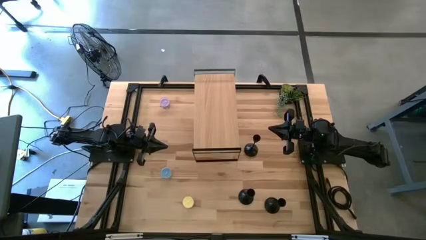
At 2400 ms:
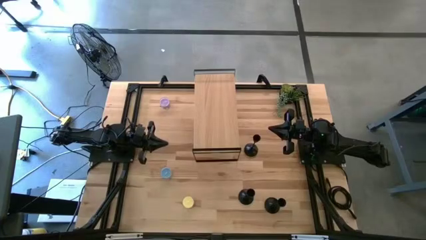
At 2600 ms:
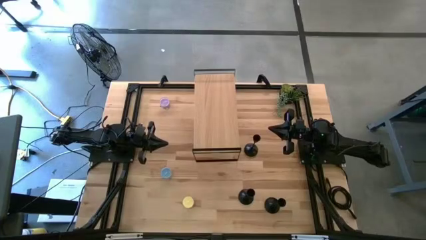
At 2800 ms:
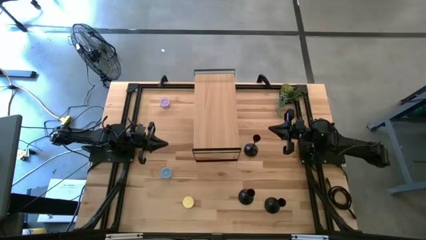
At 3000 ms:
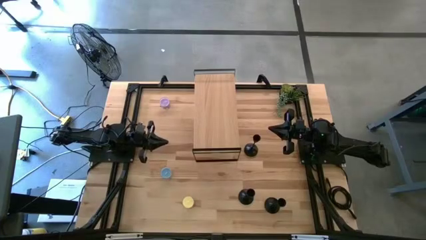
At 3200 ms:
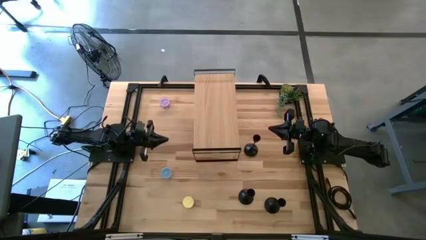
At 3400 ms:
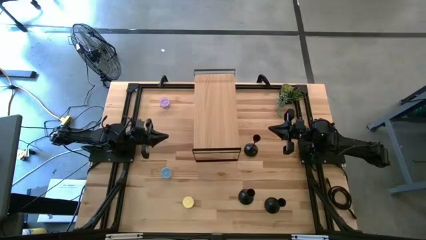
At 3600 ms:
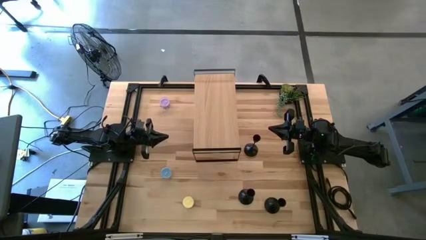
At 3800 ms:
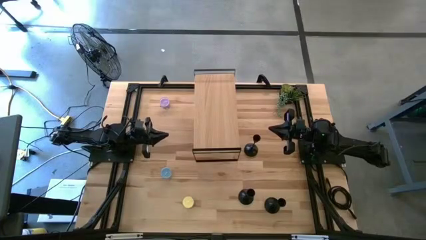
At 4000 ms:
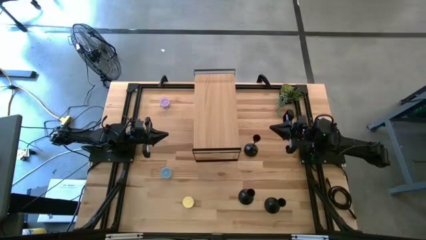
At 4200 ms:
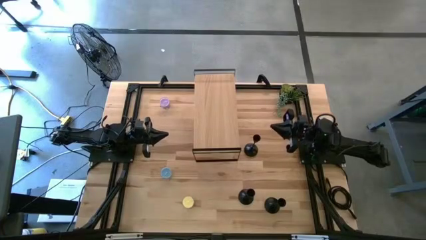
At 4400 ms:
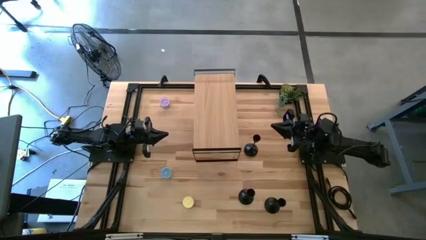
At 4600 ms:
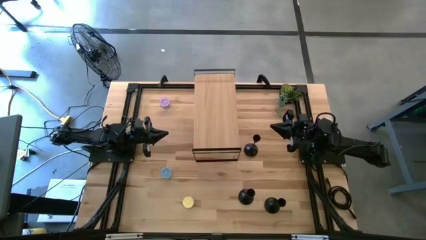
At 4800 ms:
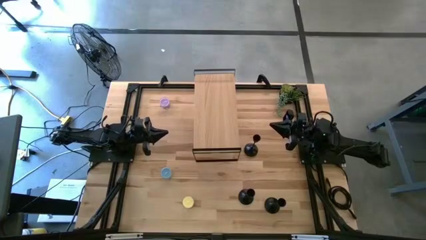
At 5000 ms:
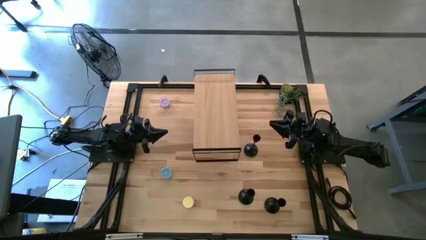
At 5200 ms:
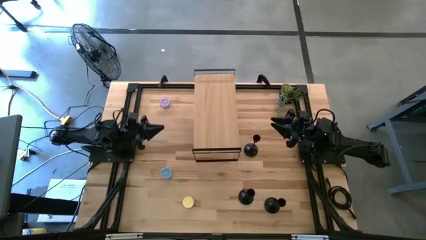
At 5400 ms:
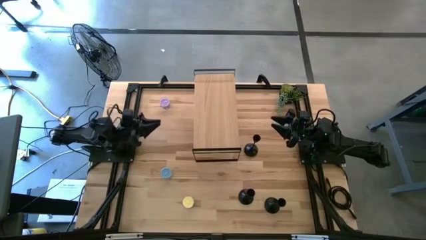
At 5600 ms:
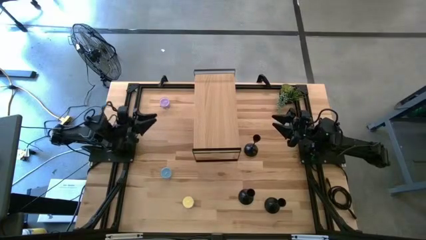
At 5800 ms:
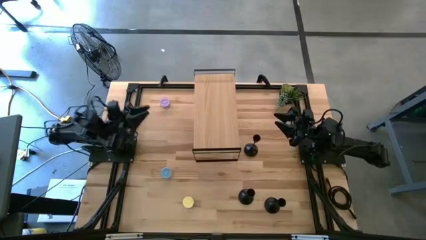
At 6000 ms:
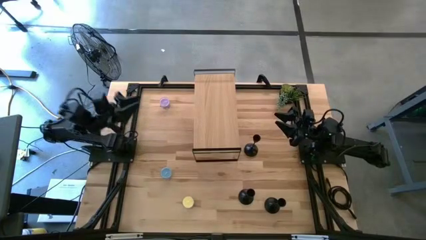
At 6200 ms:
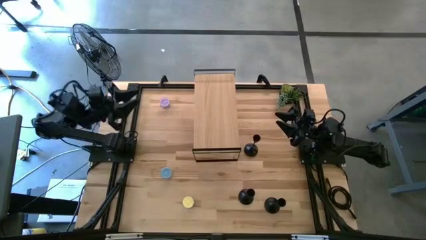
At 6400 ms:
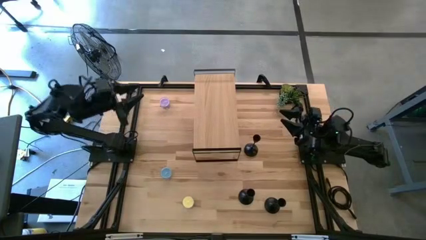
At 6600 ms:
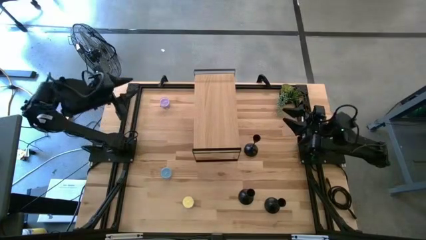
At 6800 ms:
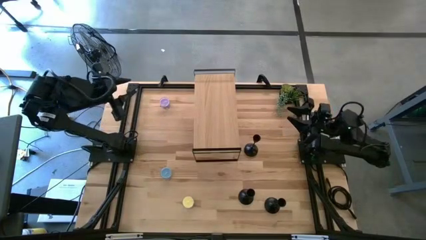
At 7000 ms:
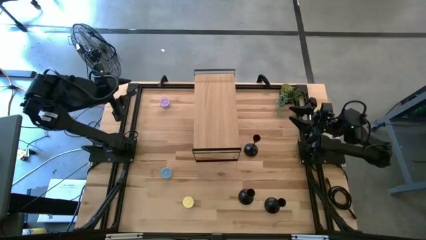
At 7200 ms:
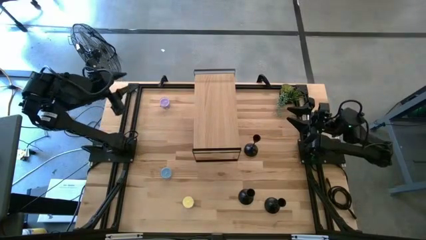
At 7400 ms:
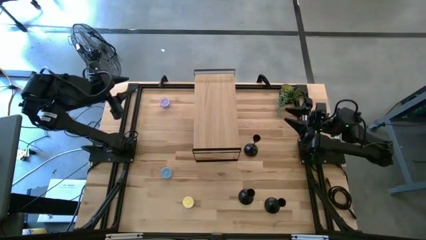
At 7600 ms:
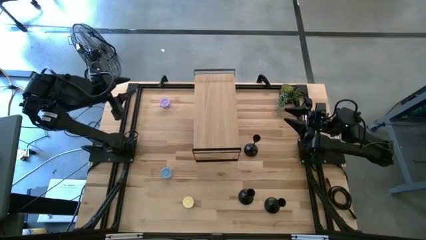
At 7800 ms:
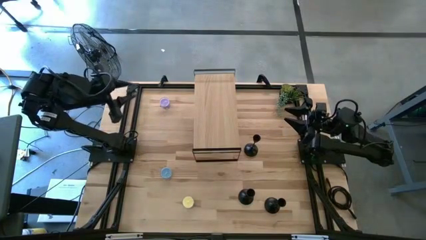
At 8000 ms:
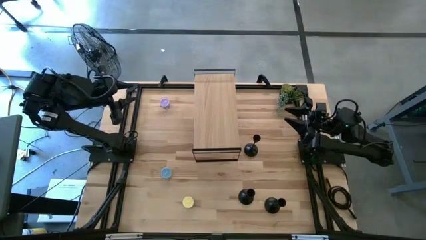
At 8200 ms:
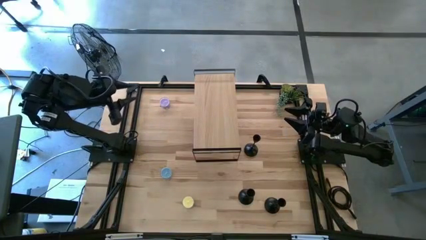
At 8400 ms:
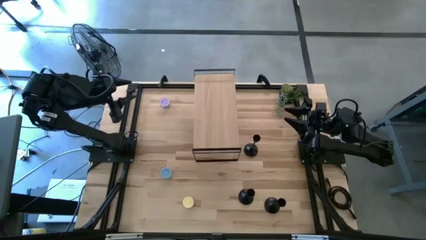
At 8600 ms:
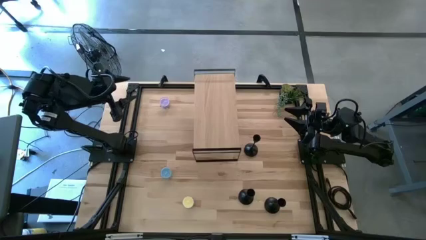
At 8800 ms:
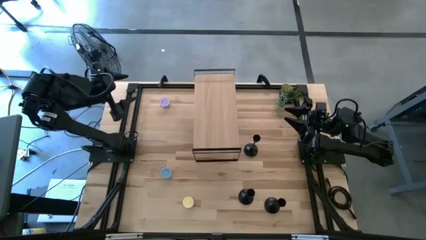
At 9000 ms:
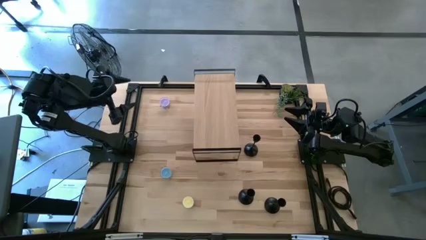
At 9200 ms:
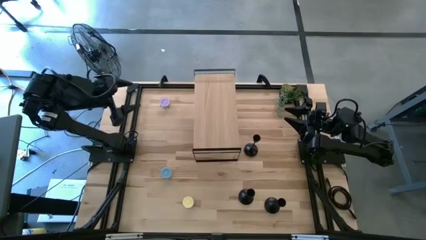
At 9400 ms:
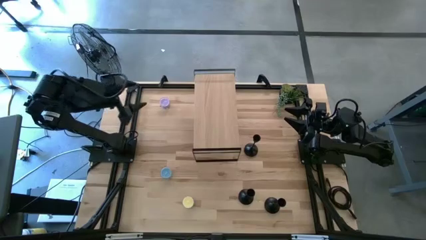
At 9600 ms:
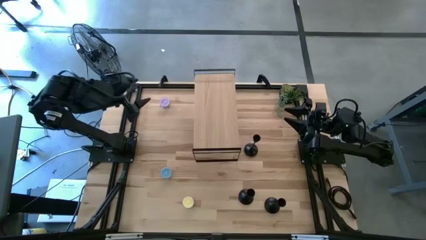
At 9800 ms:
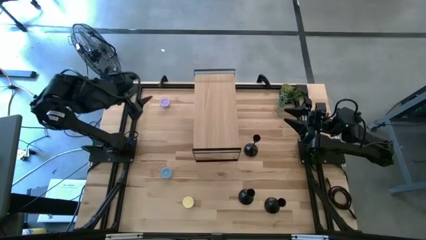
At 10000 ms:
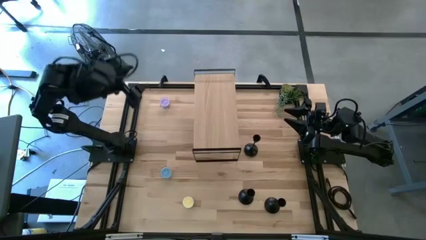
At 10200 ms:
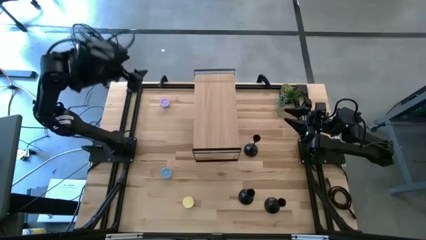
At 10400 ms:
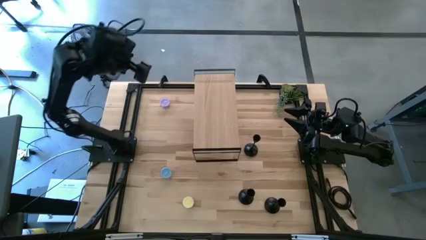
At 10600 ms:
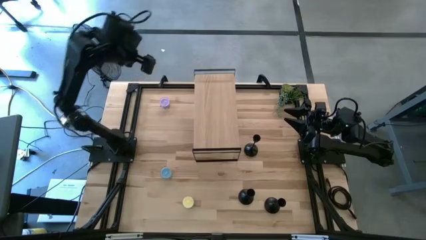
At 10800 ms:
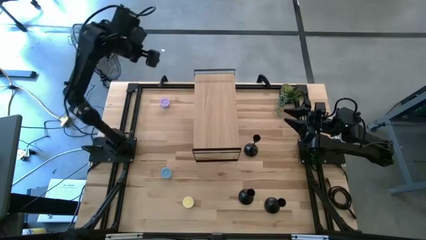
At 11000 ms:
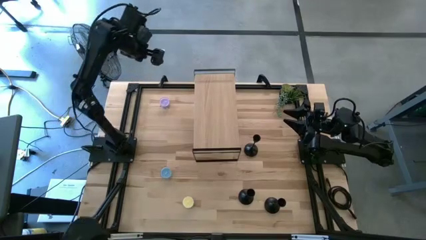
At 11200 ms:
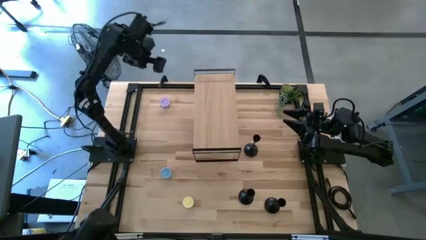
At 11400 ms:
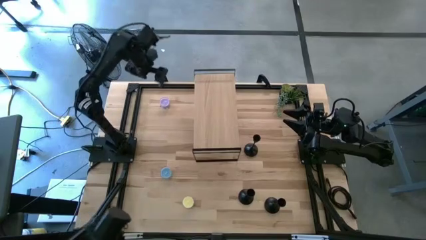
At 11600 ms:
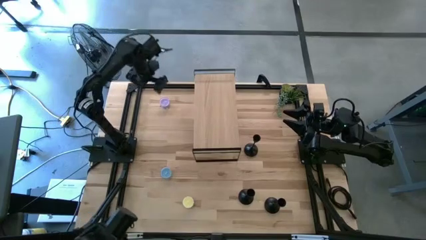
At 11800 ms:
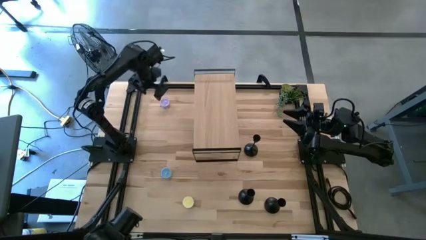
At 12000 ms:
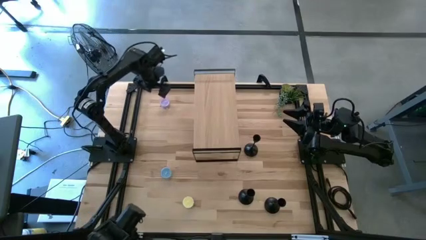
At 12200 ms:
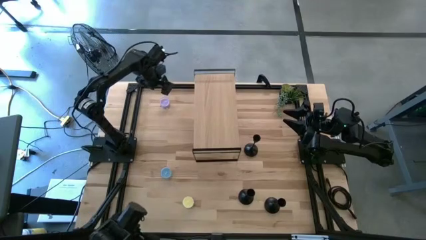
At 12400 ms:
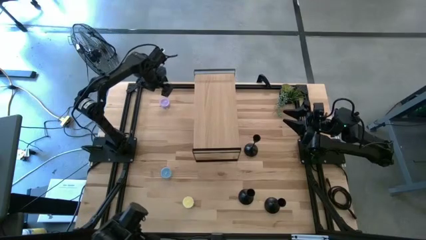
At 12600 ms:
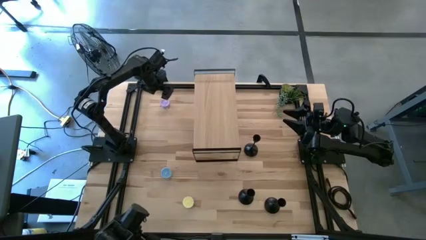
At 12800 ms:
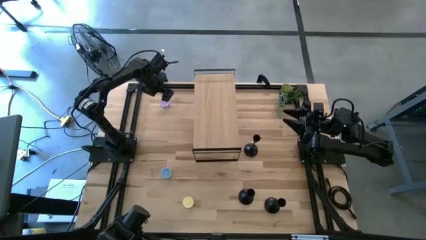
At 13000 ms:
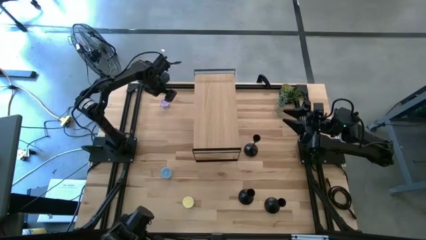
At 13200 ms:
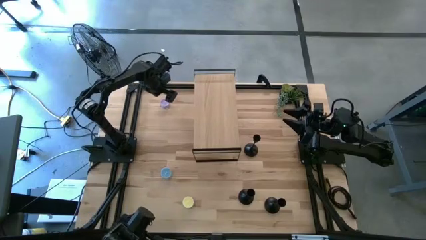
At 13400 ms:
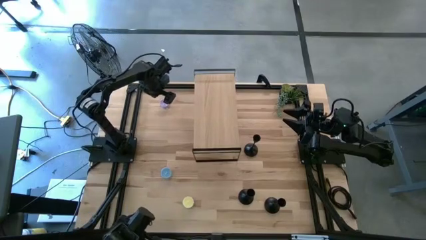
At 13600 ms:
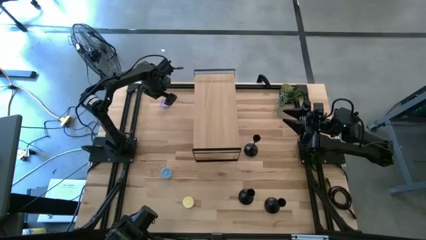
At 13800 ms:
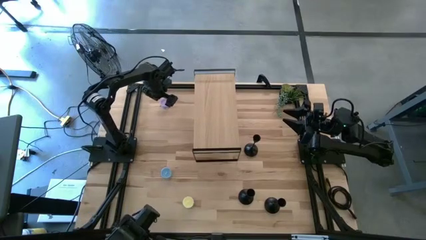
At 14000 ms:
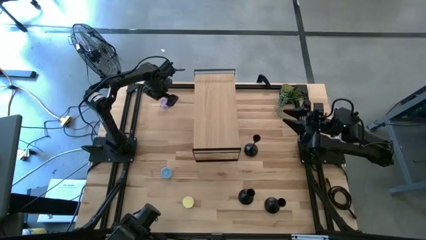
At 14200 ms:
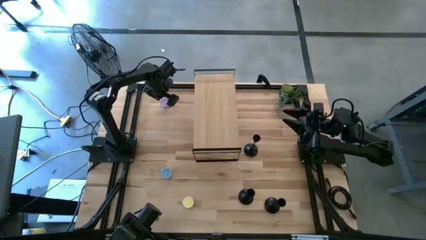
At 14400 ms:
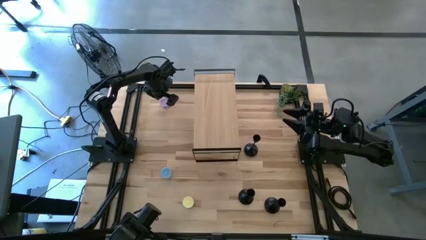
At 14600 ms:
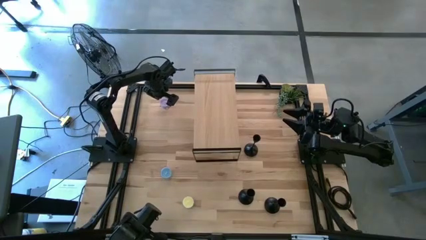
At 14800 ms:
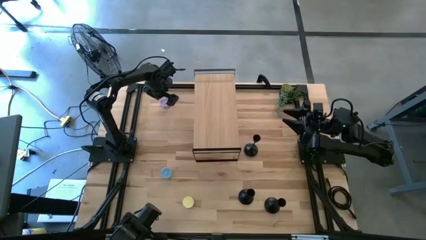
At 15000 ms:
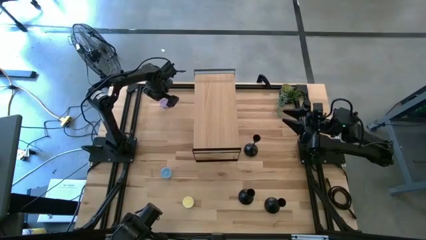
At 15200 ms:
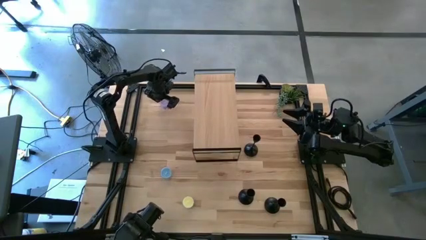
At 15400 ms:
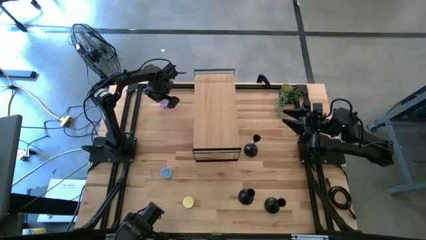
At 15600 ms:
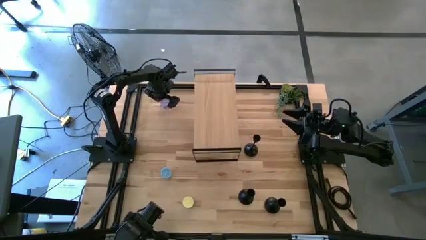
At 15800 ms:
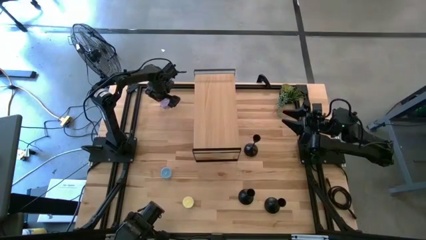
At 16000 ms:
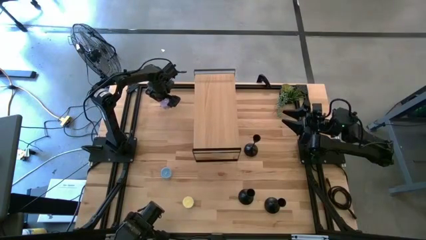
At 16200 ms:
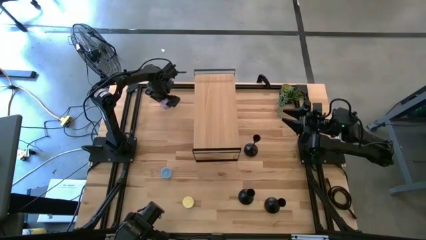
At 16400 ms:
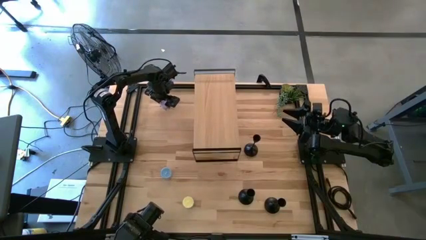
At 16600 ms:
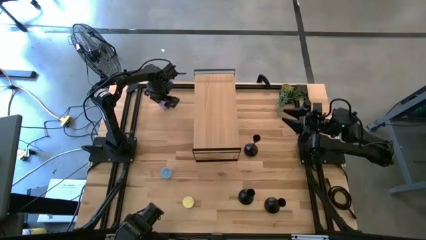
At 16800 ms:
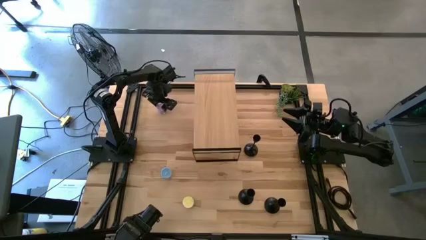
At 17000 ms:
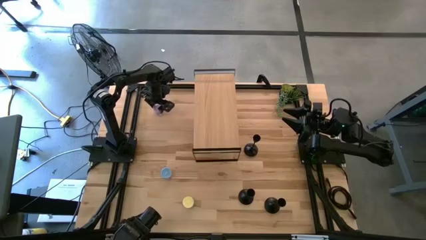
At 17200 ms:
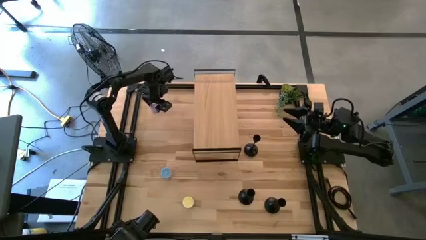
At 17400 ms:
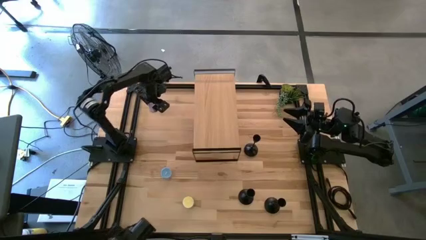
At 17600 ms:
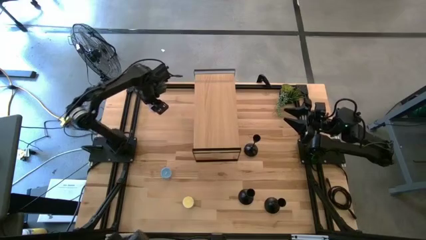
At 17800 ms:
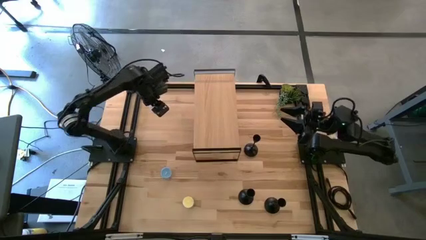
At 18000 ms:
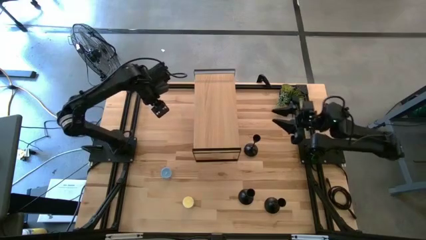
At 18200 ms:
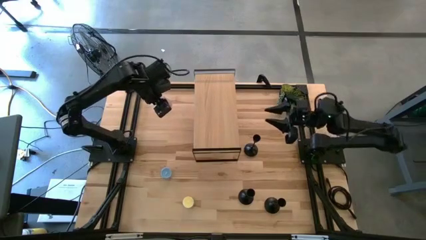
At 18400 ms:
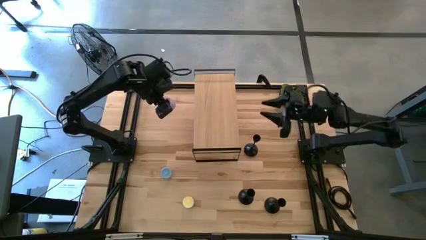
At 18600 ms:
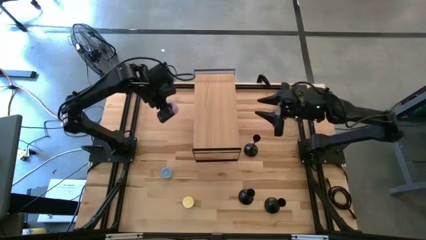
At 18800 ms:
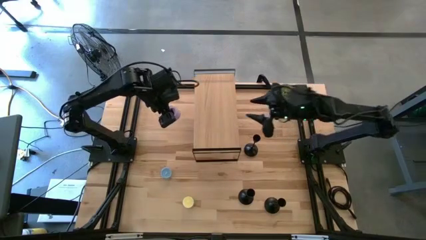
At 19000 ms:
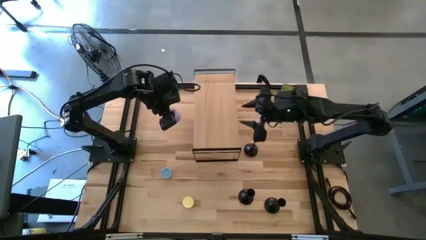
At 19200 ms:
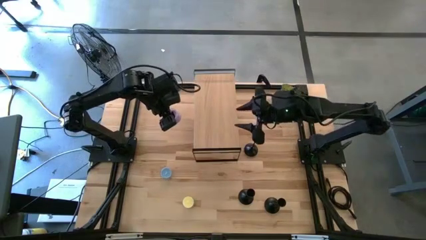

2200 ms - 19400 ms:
Task: Pick & Place candle stick holders
Put the purple scented candle on the shelf
